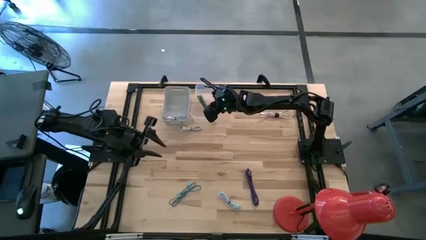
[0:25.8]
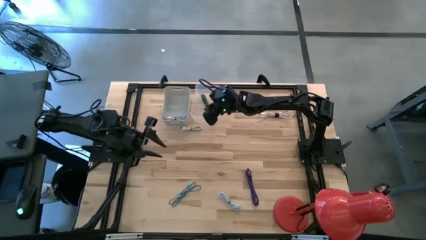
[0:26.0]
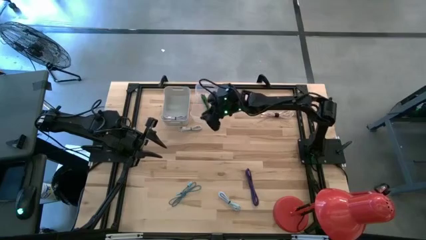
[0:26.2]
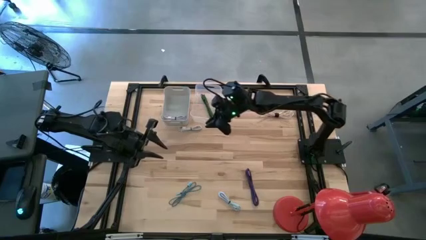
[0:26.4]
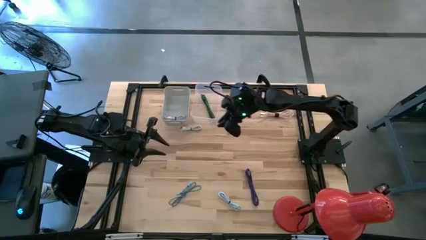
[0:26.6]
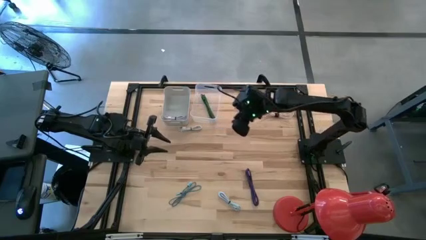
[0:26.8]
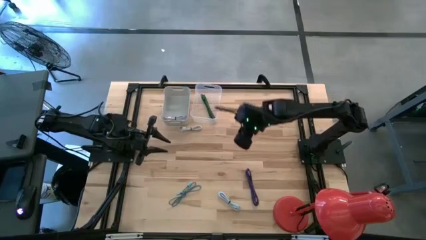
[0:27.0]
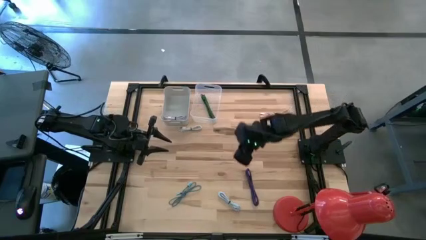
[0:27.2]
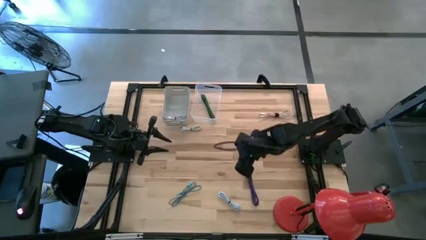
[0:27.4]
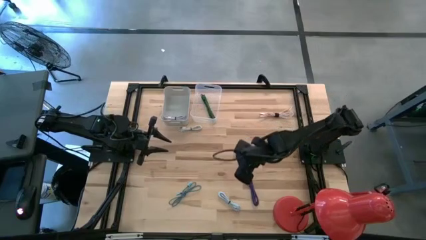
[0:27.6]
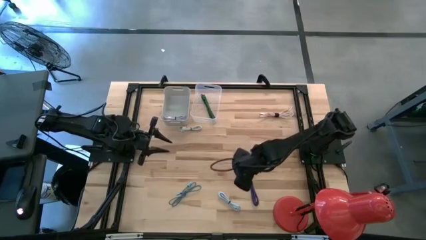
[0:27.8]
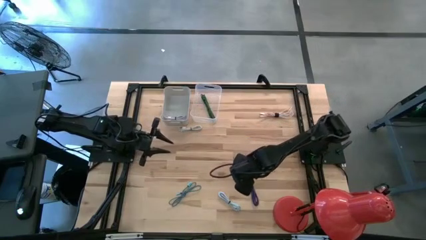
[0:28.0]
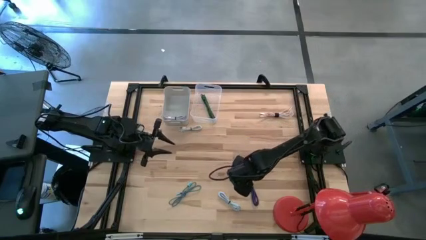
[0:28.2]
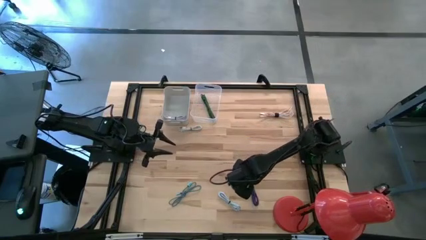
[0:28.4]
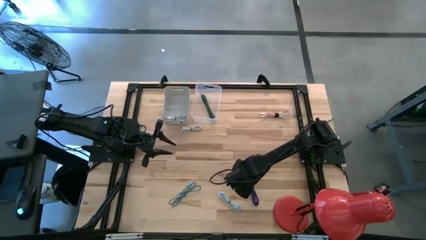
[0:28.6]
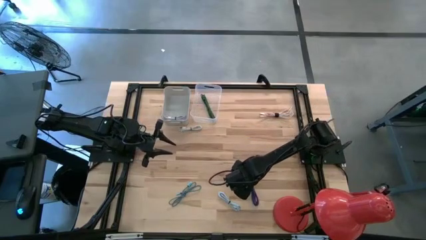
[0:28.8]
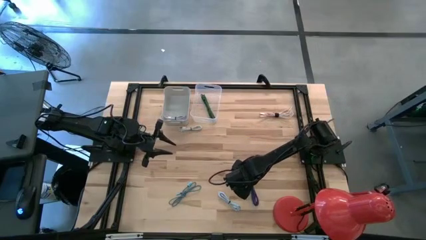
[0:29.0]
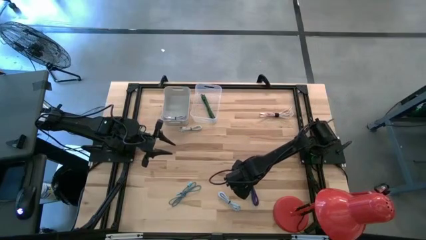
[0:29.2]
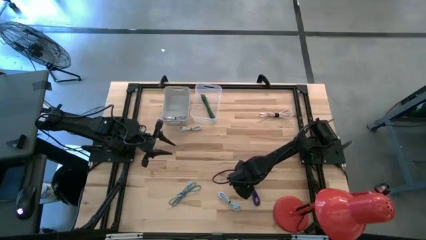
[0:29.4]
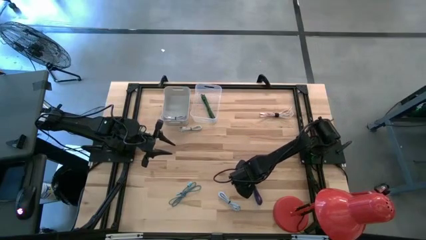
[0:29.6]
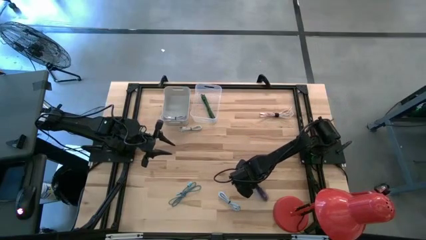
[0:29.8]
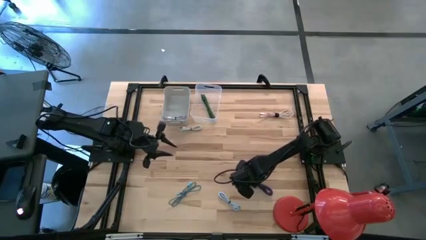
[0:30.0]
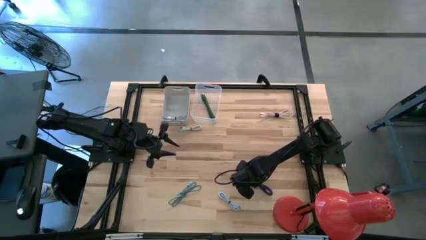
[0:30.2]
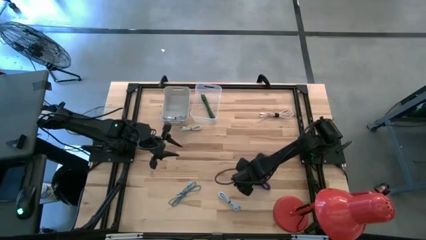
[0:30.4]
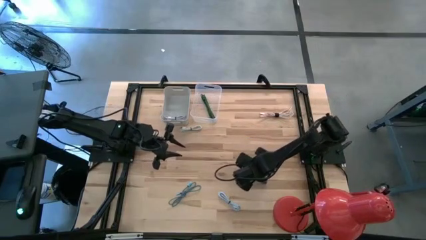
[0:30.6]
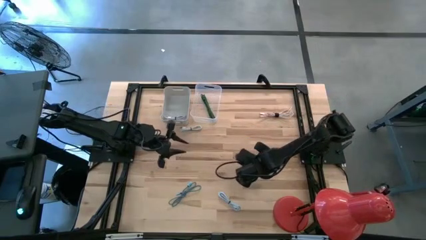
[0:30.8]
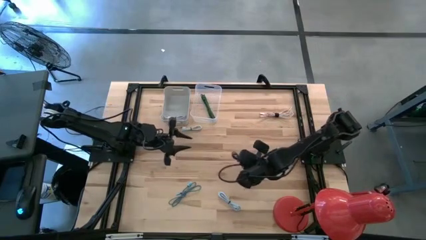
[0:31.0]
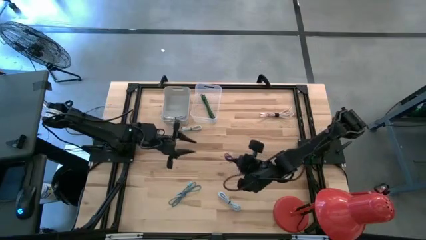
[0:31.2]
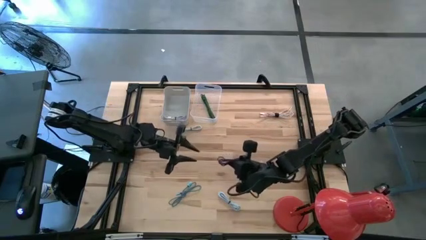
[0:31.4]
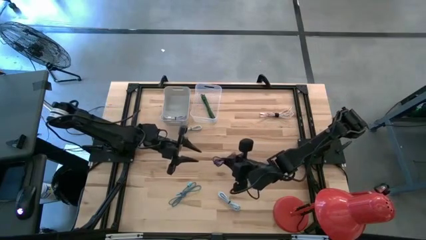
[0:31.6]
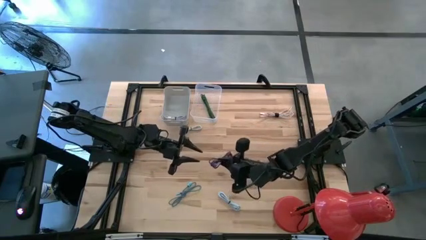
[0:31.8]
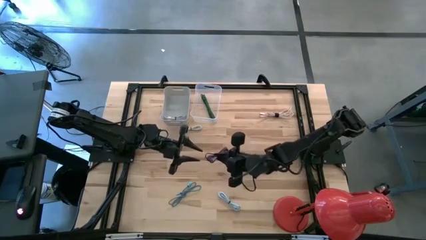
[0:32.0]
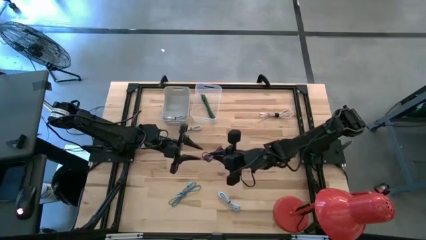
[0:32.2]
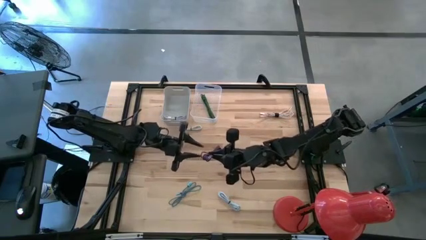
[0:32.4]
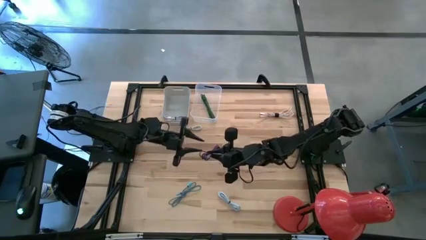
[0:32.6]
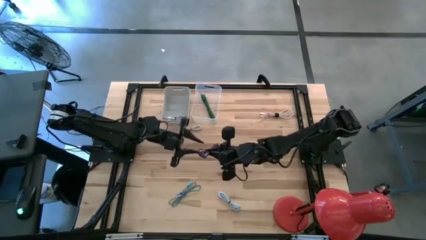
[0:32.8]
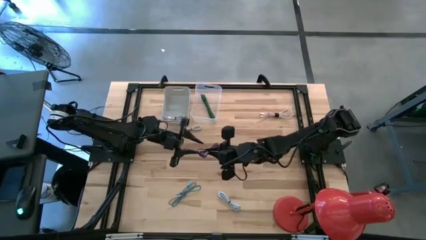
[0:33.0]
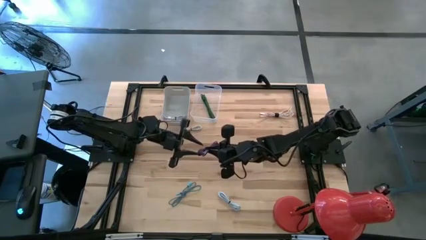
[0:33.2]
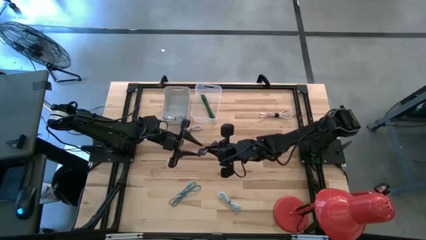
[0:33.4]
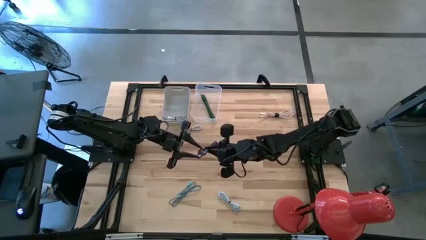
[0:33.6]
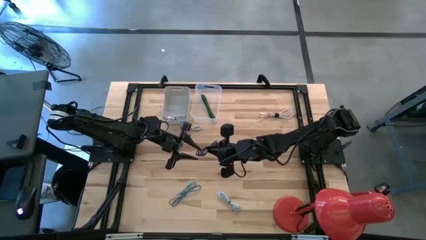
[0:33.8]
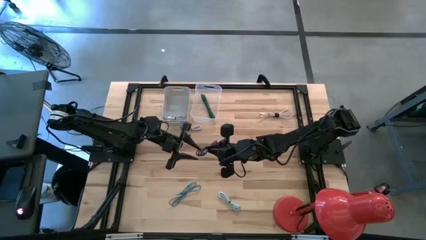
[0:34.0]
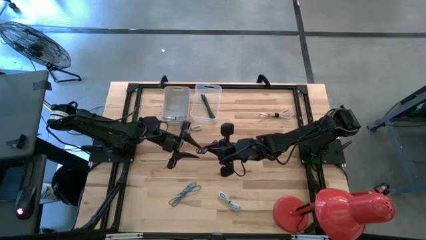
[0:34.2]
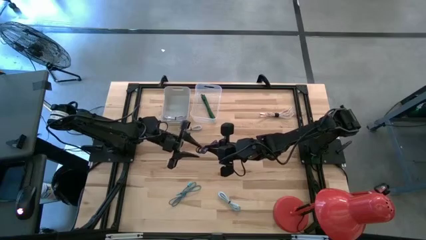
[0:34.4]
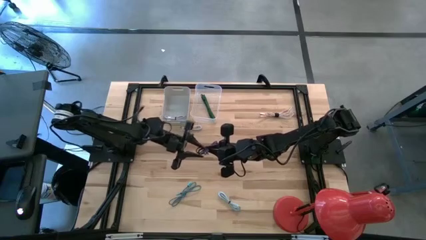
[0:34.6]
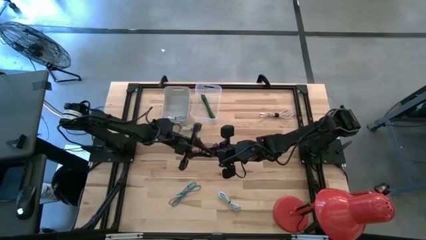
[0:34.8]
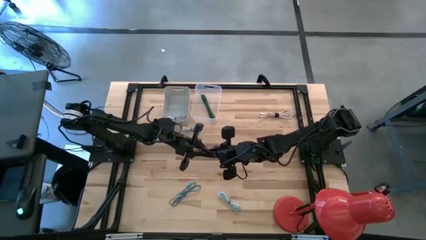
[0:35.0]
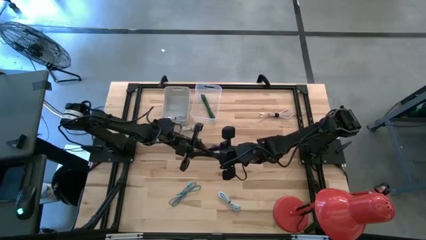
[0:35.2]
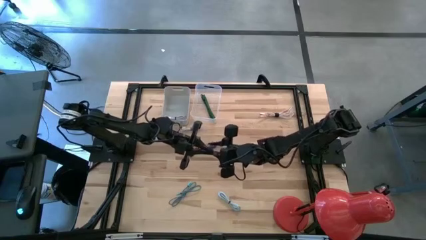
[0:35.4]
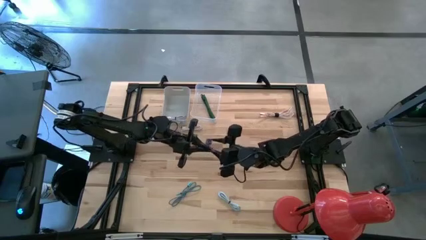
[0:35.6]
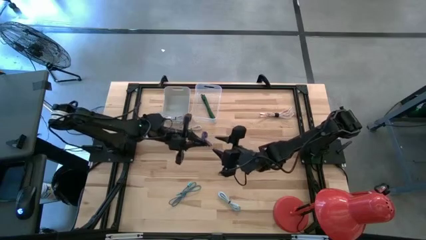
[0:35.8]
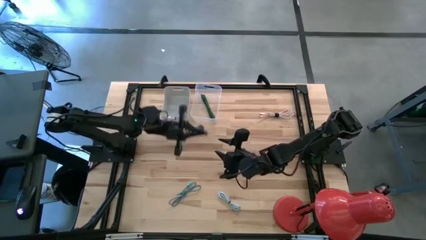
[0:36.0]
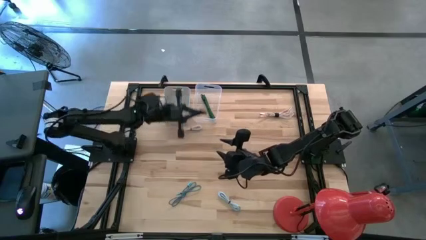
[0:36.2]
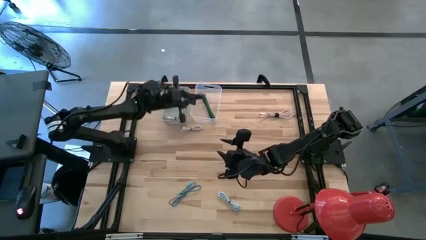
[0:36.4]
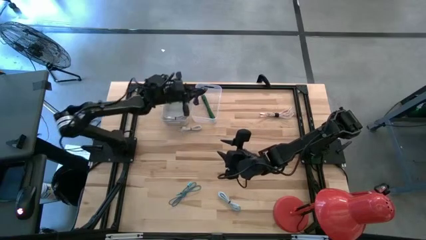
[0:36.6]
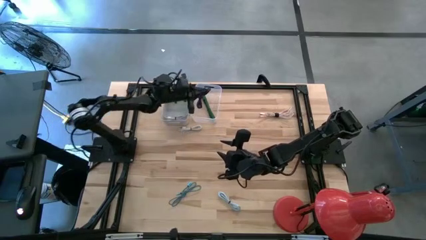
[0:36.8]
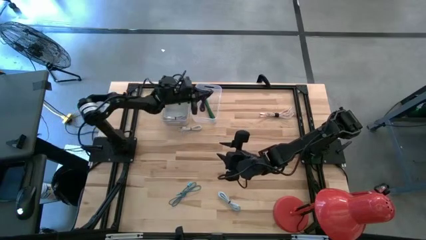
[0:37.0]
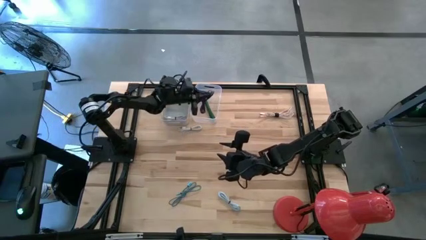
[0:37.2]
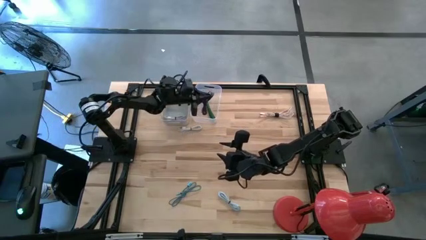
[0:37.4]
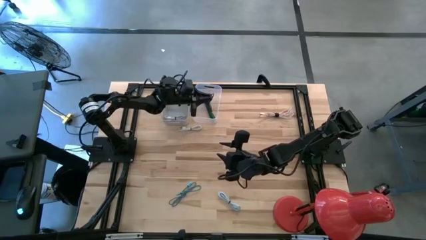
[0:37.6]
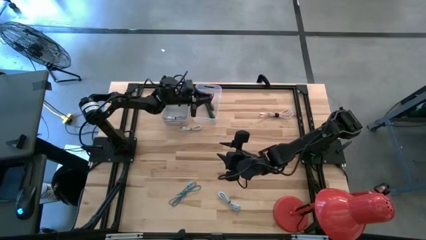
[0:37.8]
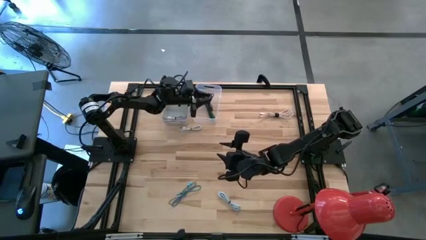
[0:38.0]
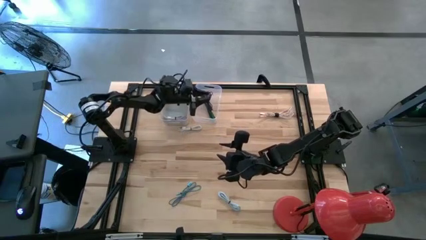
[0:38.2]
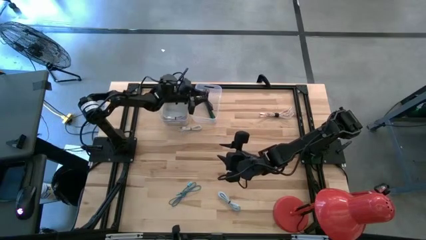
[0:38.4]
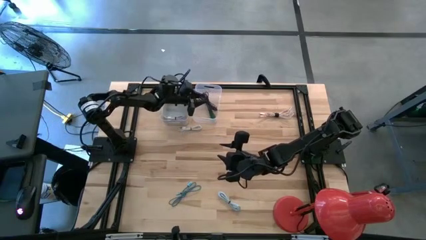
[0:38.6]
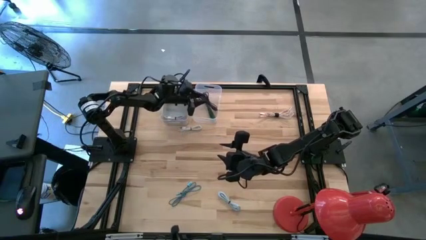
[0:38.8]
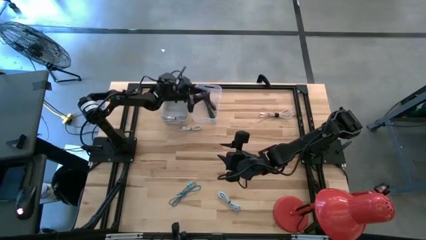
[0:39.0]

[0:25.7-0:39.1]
Task: Pick & Place USB Port
Put the striped blue charger cable into the transparent bin

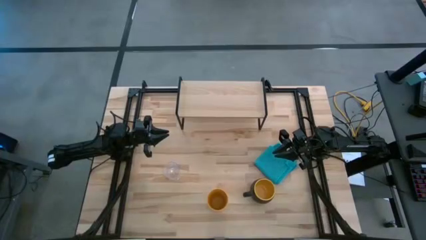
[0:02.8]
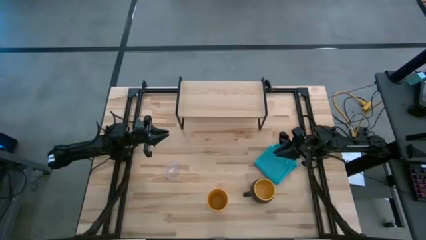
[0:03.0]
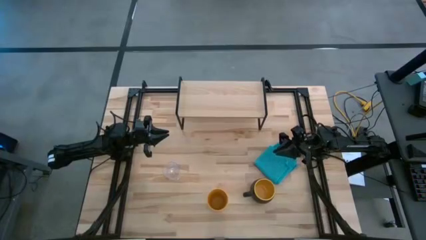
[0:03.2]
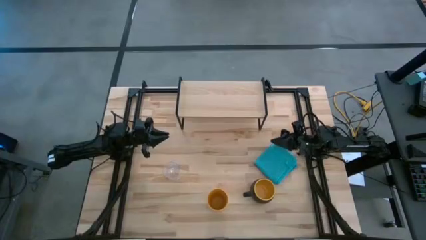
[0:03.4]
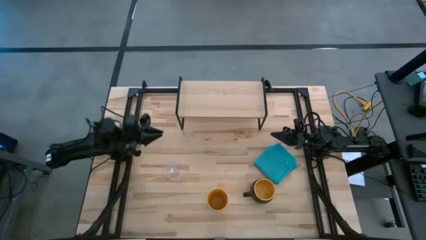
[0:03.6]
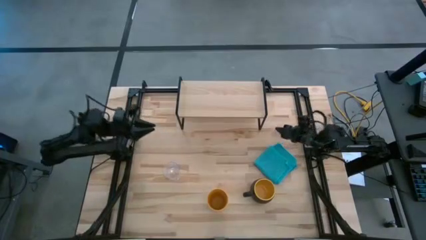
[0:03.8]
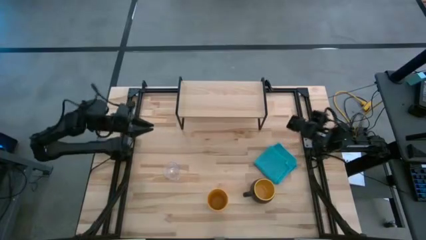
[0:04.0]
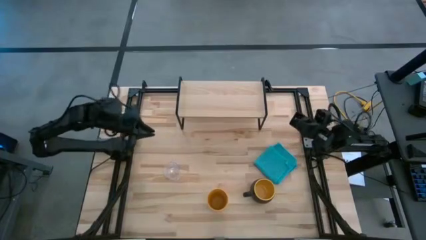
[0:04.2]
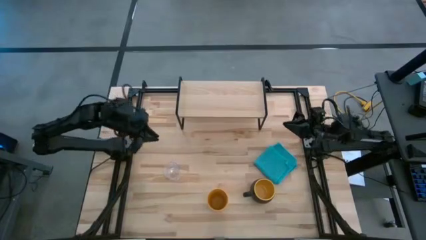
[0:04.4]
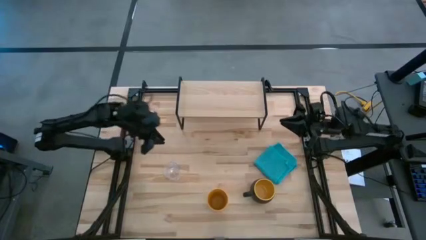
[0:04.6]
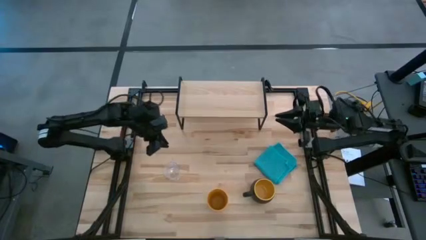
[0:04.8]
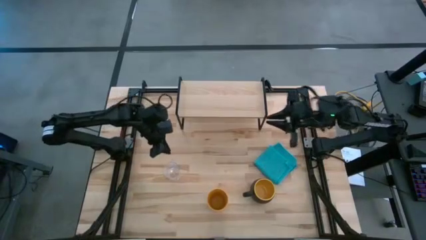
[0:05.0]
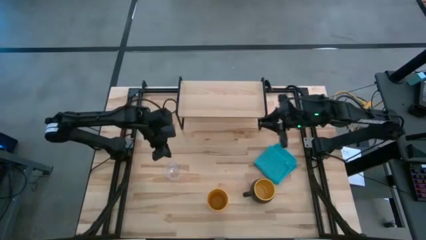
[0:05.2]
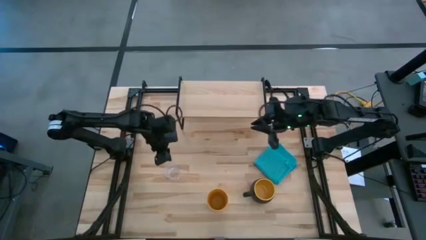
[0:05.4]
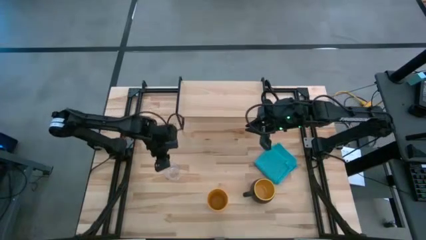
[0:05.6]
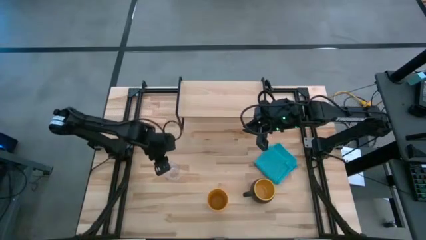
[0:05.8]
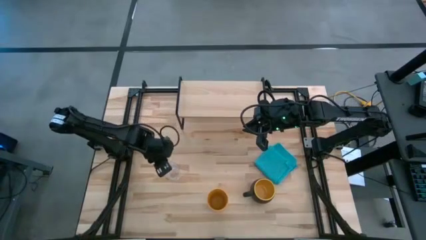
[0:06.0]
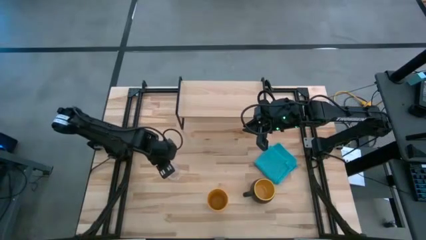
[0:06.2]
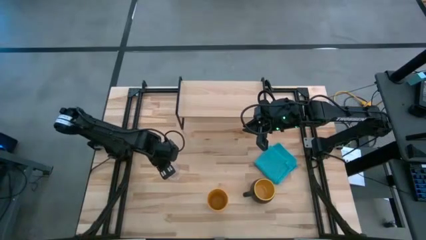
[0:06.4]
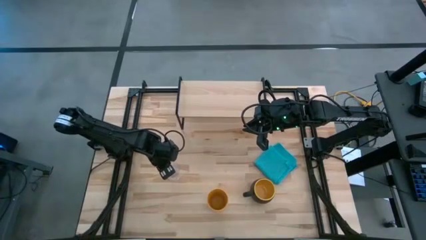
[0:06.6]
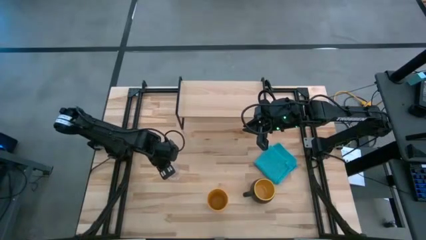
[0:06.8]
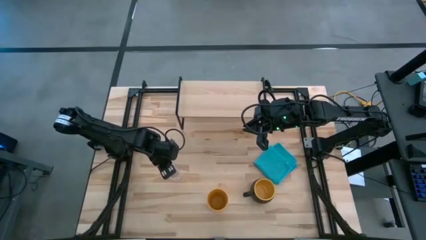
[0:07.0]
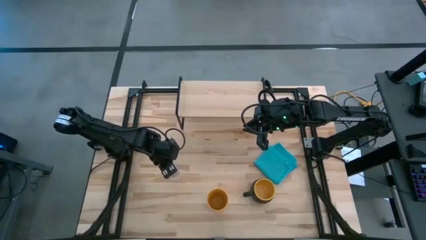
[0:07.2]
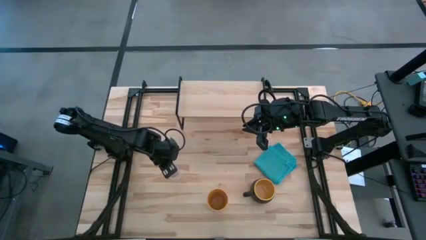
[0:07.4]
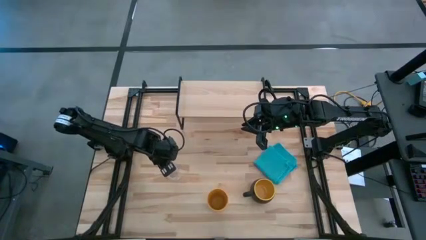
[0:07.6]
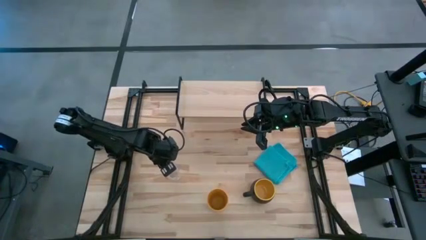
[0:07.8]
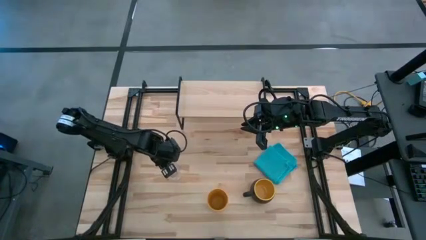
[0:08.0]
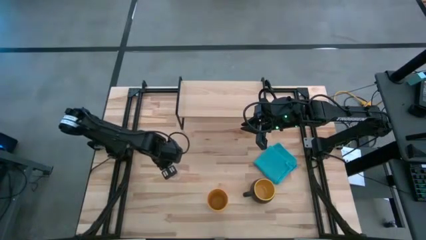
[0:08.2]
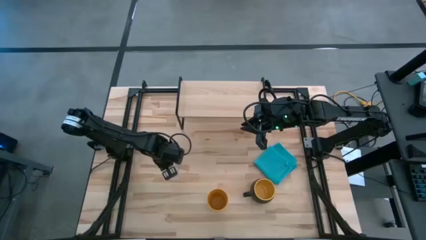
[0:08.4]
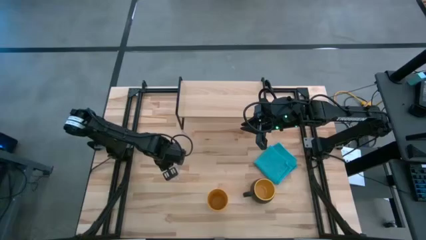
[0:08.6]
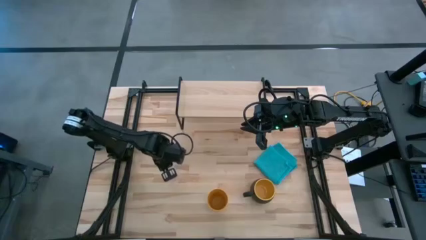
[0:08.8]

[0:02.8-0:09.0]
Task: Stack small to large cups/mugs on shelf
Put the transparent glass mug on the shelf
